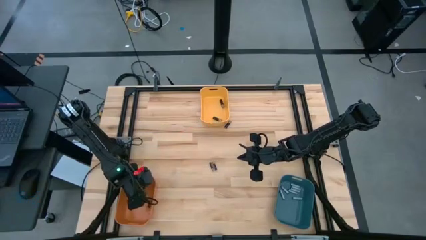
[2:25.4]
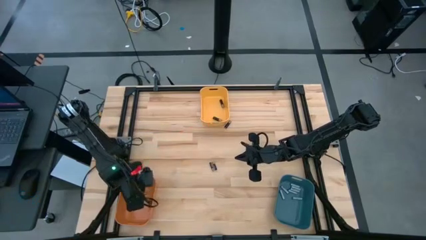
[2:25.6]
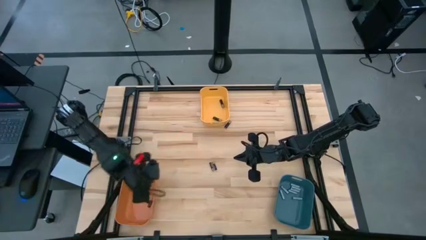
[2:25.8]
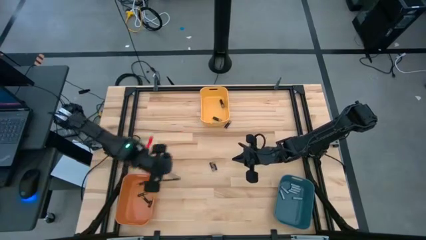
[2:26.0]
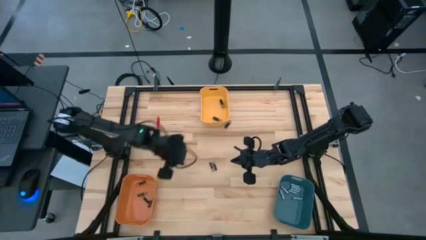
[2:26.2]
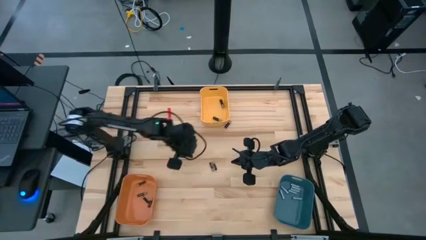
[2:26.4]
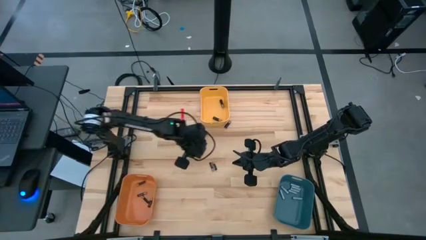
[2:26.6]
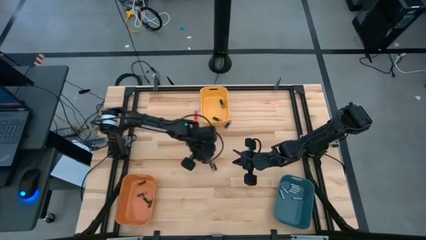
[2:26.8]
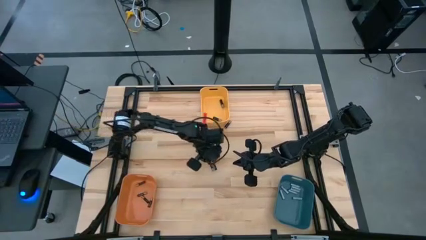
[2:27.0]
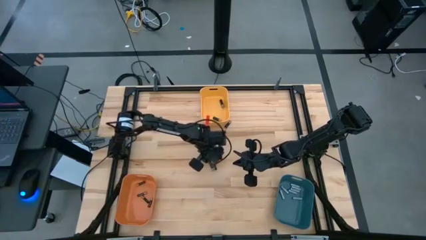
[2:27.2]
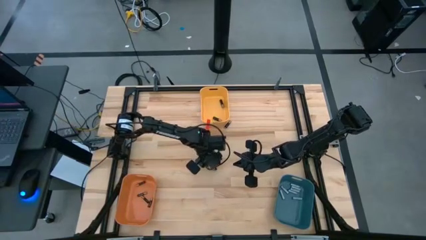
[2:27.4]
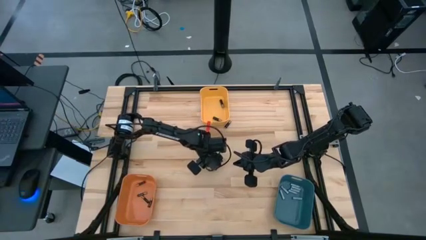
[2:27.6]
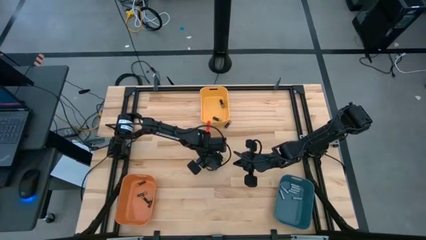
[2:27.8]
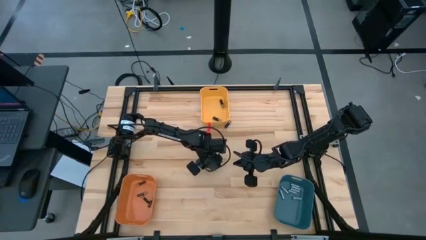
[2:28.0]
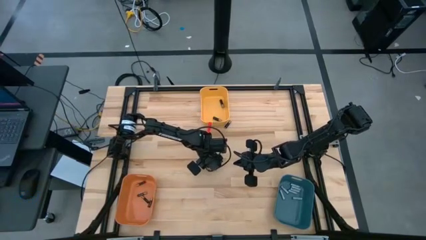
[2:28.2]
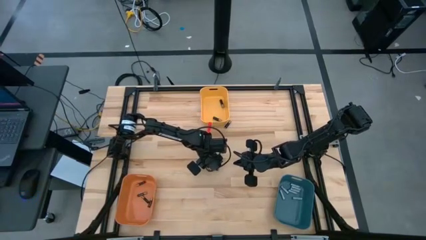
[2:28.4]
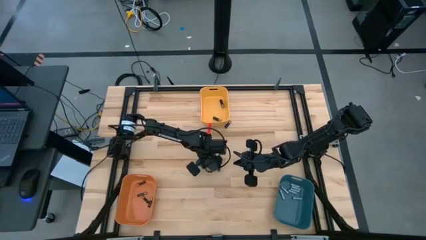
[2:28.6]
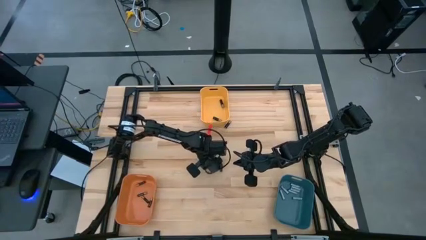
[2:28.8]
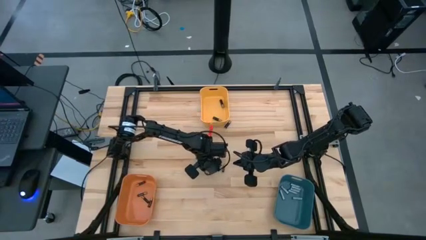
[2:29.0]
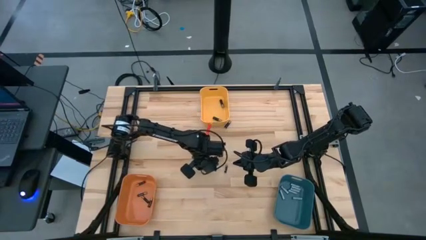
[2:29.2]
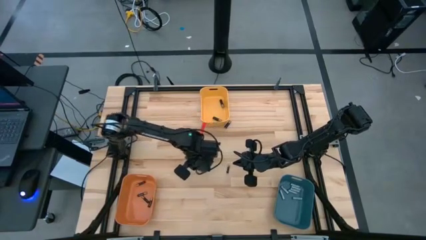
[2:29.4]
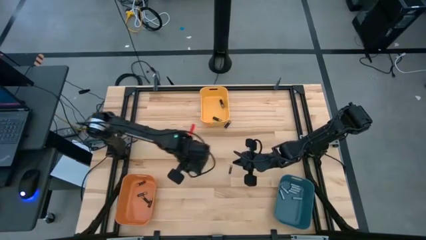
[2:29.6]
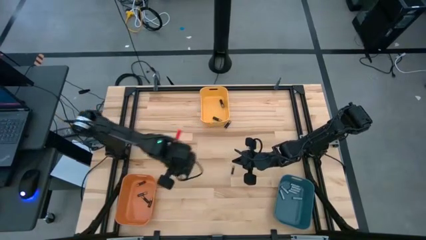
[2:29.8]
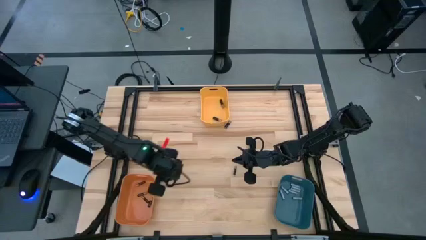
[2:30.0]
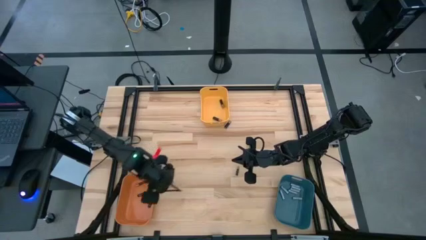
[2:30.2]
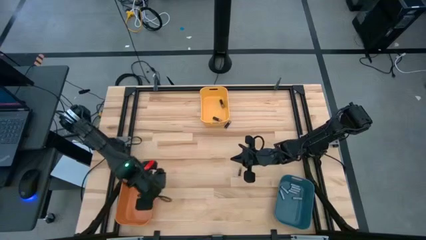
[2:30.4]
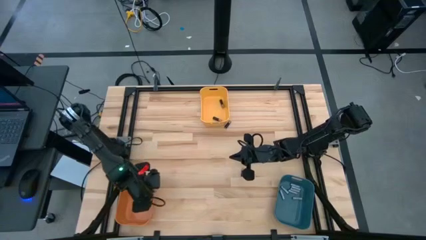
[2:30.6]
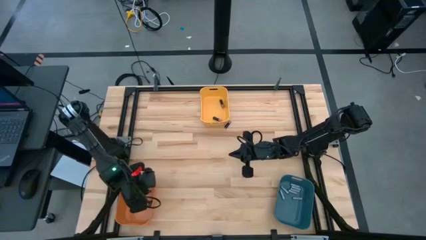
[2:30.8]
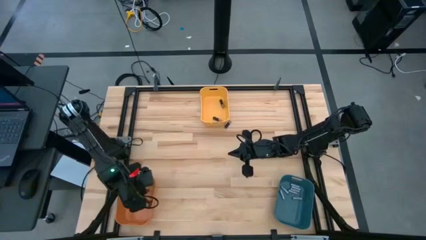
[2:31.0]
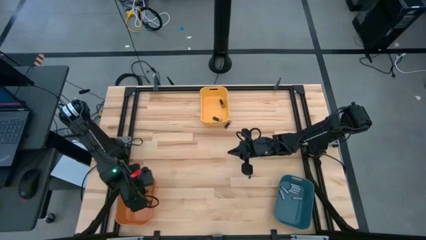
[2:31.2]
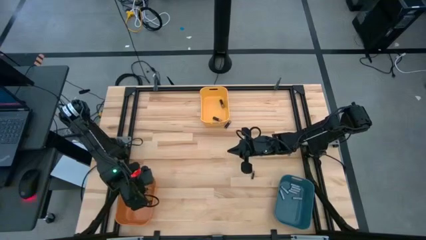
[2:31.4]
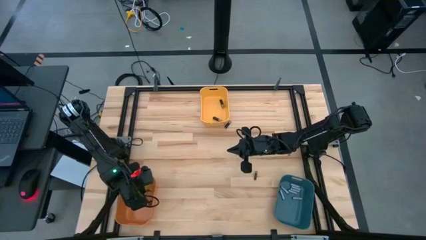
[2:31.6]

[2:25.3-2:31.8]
Task: Sort batteries
Put the small black battery into the orange bin

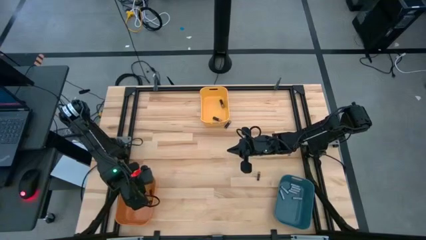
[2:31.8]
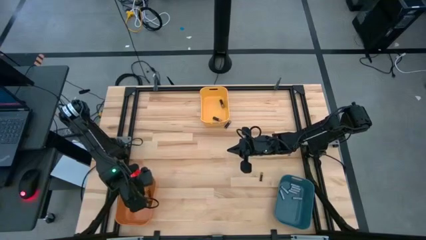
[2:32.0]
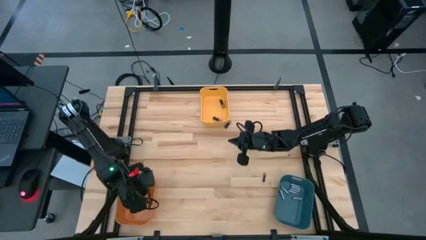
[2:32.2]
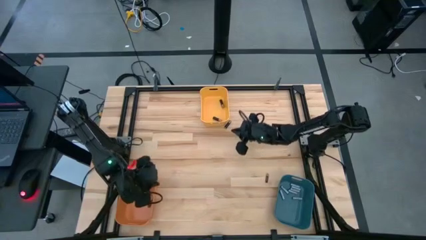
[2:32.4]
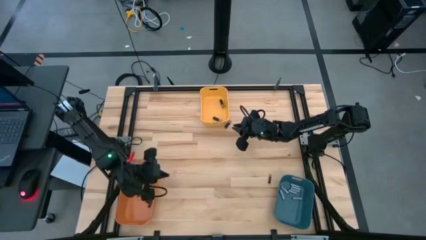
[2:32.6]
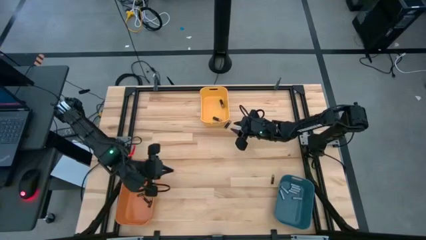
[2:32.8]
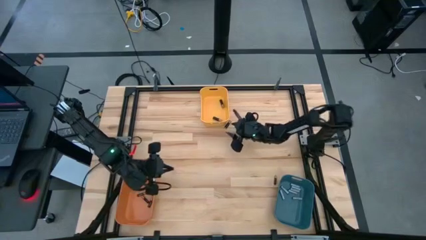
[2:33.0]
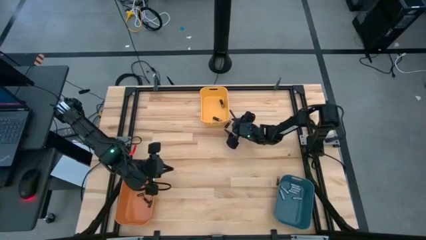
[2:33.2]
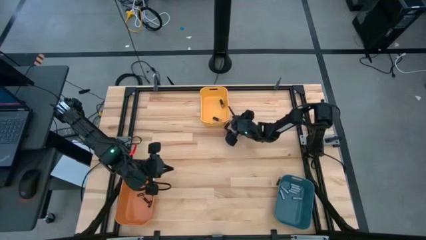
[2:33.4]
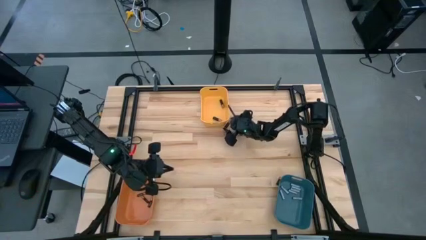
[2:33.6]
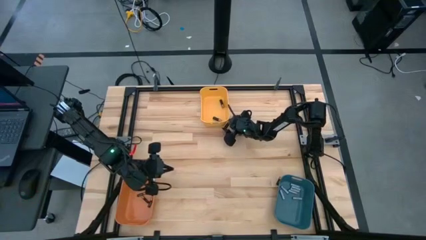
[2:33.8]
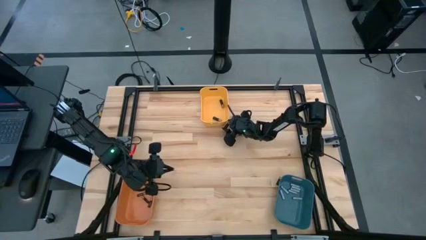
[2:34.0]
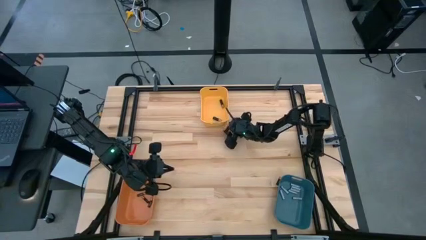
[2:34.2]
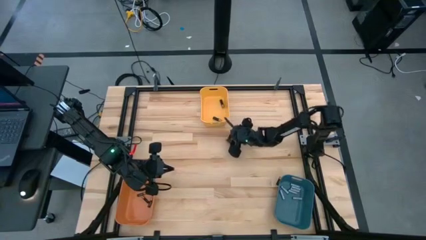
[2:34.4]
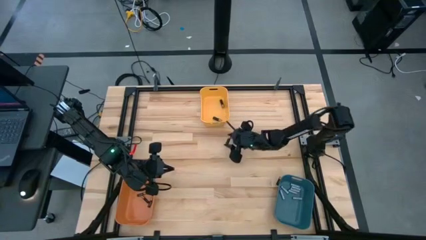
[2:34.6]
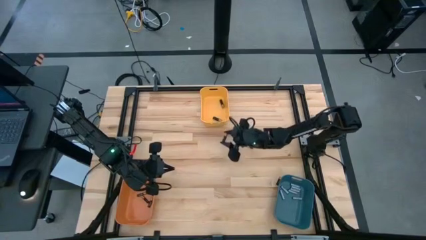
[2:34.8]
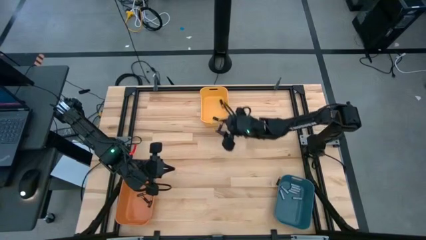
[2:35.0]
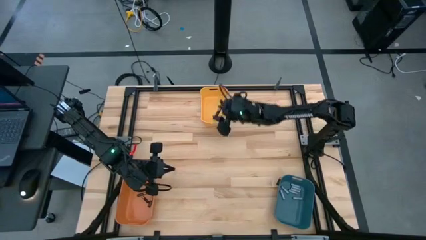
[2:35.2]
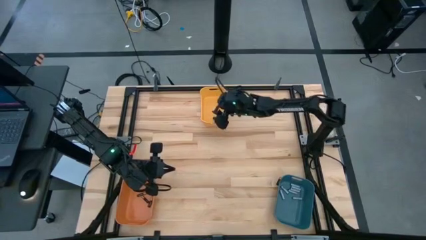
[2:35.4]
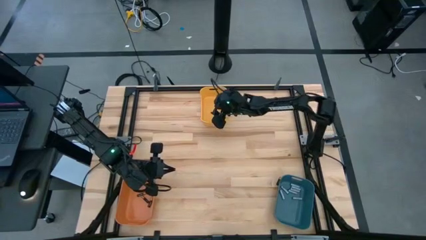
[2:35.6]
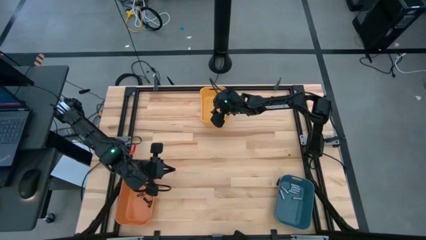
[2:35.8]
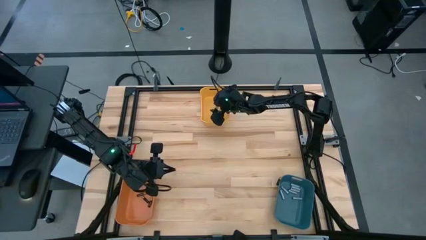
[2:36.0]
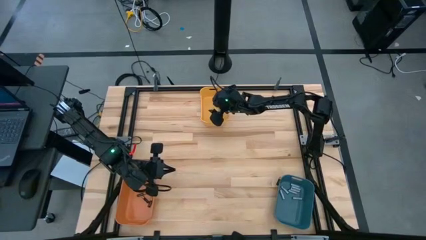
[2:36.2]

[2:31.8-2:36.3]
Put the large black battery into the yellow bin

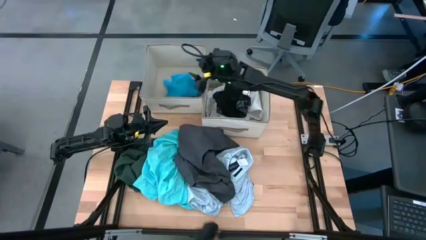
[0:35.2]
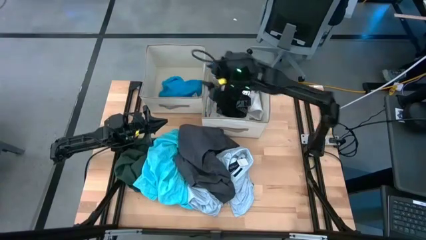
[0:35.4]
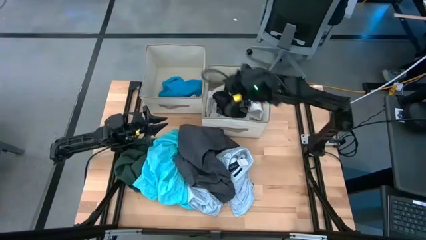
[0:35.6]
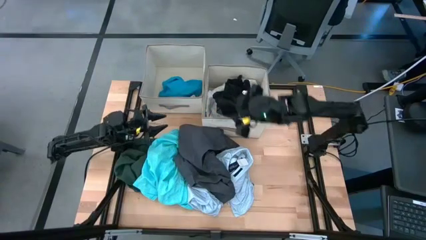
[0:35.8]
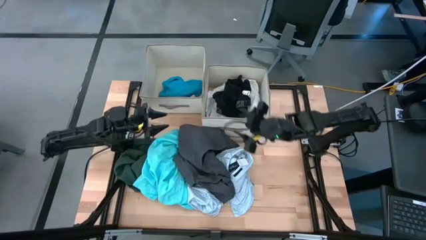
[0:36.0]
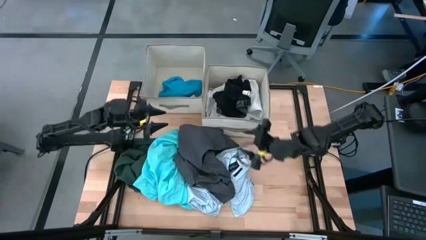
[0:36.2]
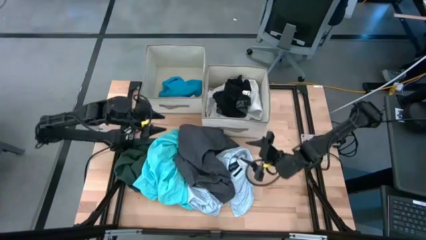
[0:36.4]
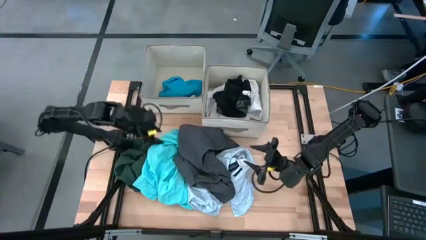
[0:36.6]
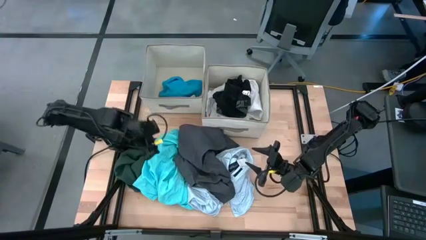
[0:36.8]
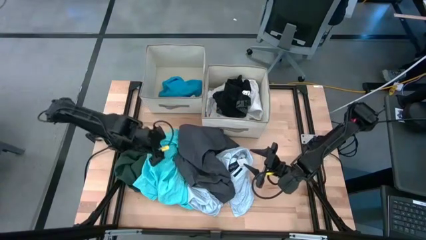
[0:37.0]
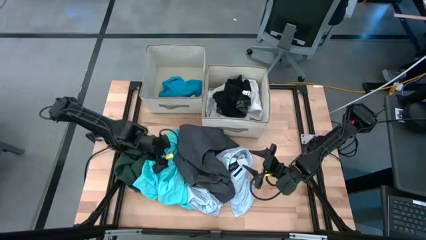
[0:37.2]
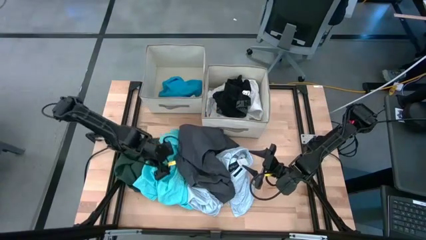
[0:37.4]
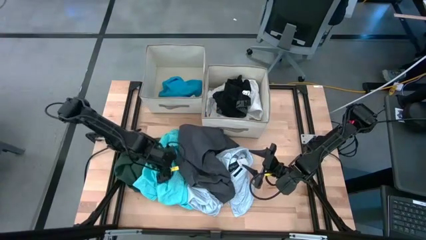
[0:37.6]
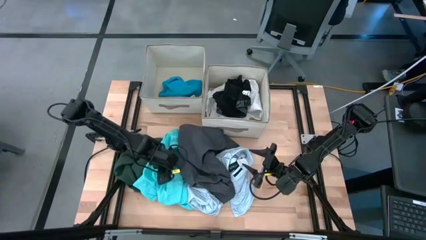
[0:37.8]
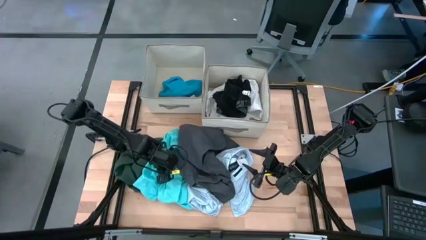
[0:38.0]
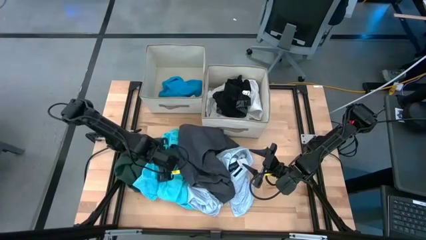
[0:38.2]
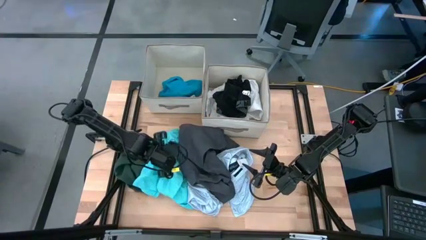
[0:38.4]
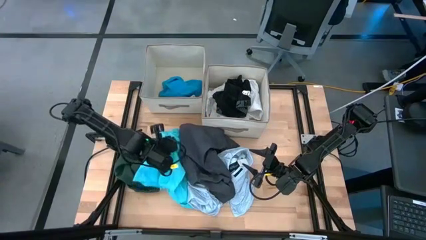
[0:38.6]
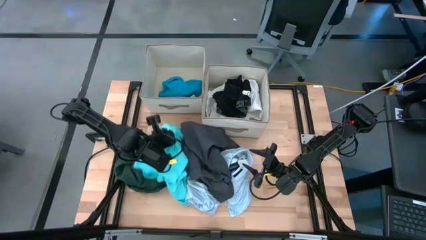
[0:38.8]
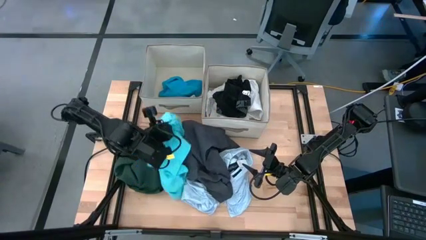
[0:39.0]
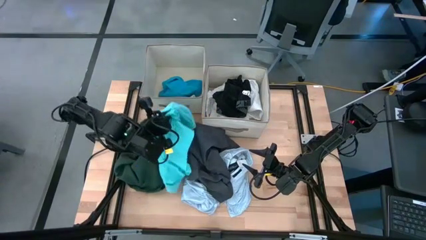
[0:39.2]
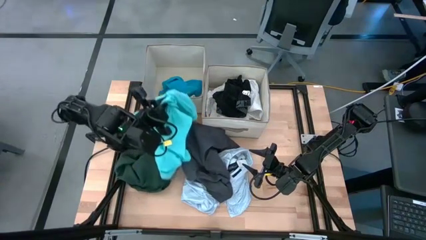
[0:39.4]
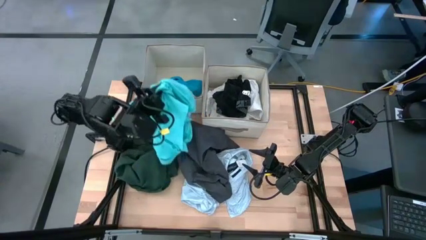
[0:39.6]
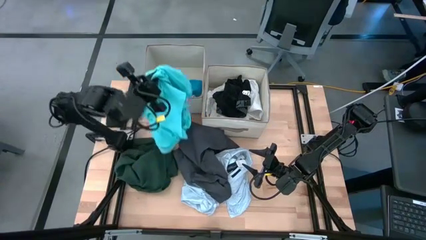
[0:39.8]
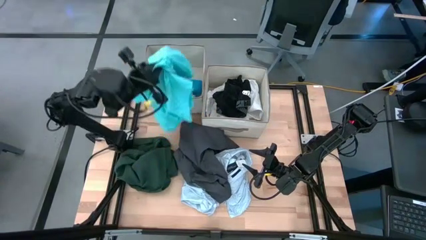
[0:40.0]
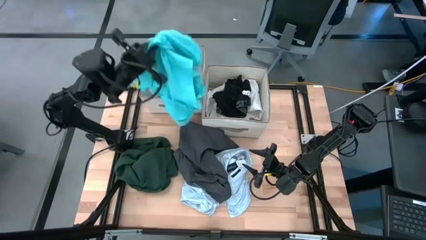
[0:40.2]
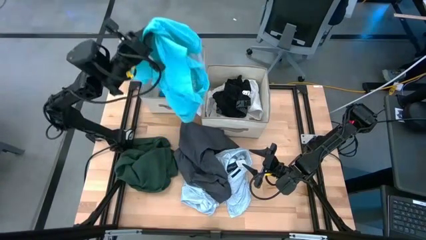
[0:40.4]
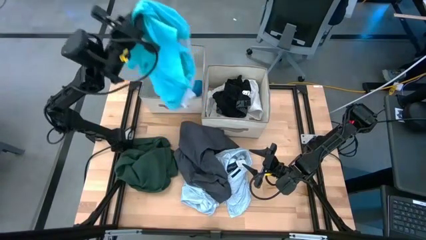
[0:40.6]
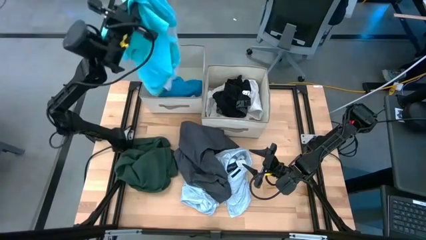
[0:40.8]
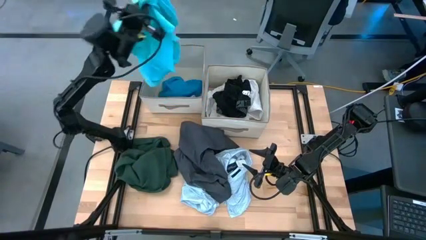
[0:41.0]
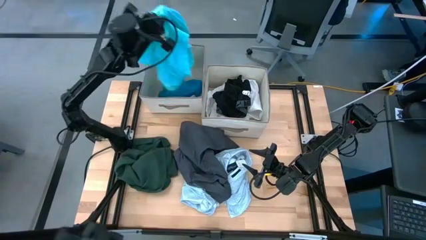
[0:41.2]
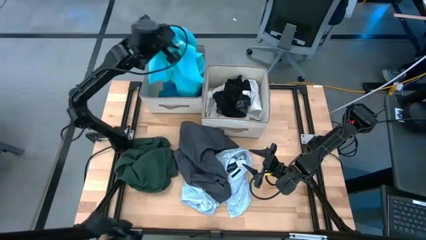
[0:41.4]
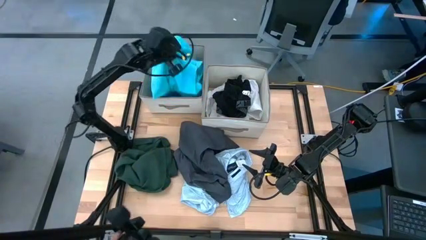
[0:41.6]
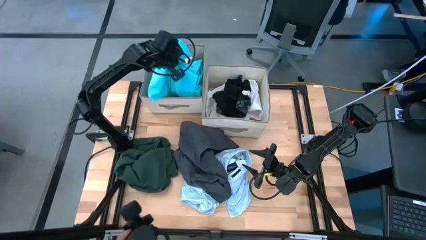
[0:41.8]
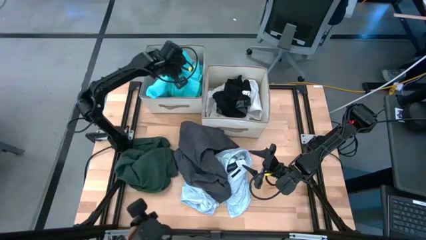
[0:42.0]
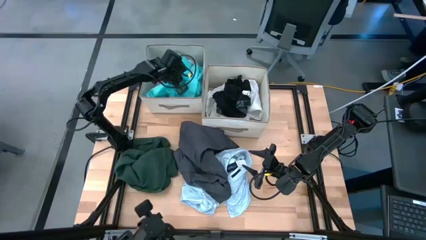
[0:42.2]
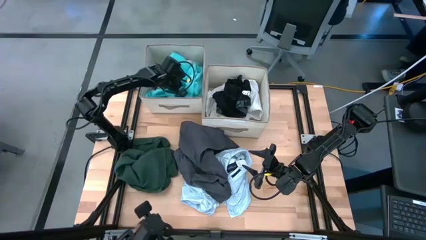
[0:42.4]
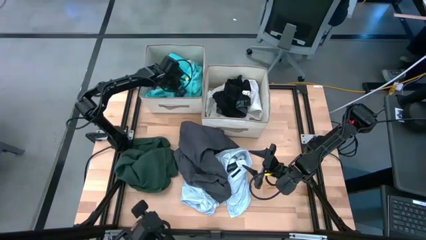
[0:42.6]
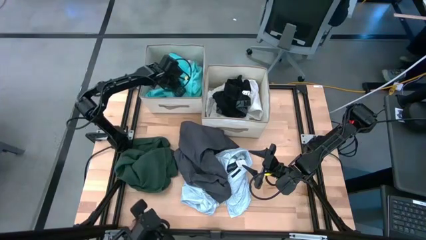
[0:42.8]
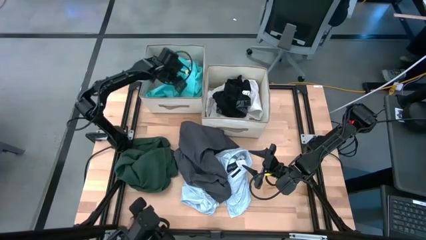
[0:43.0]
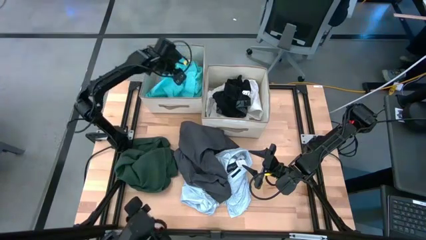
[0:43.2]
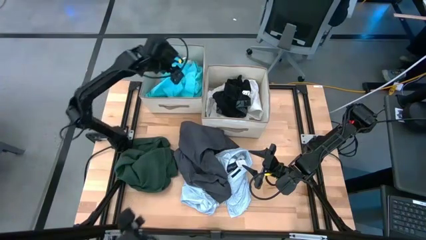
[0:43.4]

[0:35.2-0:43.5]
Task: Sort clothes
Put the light blue shorts into the left laundry organizer
